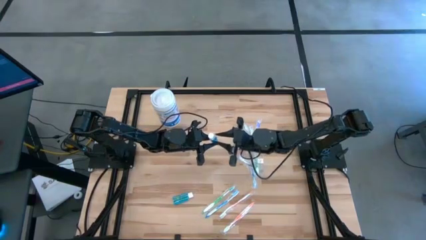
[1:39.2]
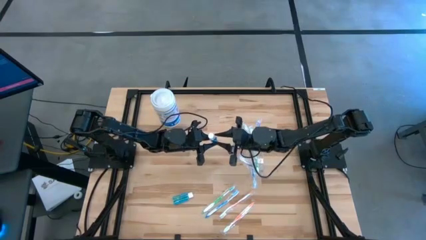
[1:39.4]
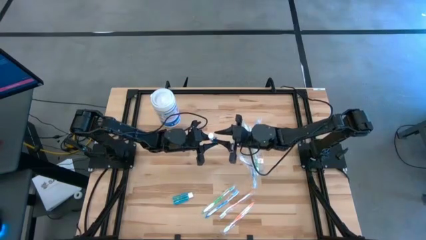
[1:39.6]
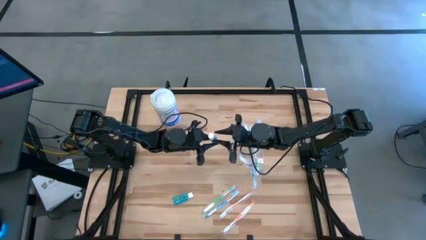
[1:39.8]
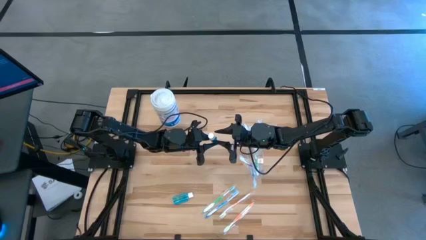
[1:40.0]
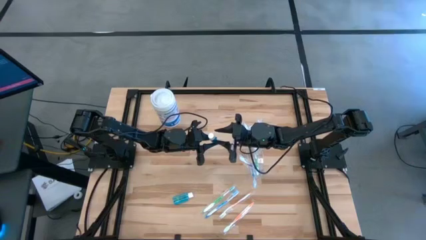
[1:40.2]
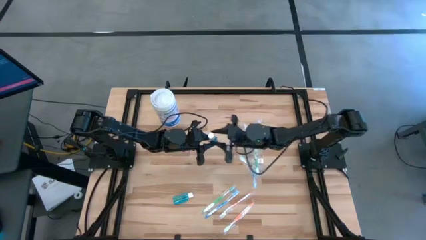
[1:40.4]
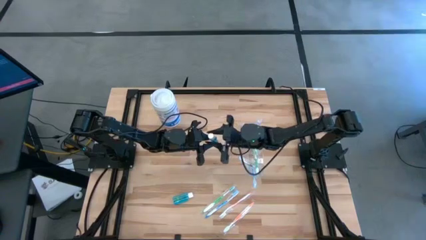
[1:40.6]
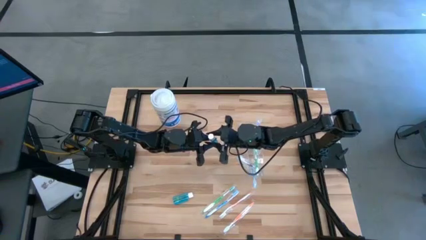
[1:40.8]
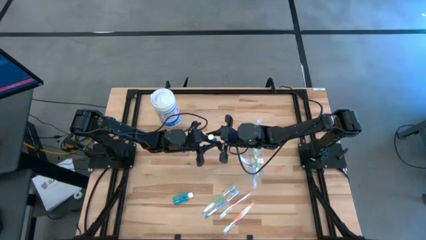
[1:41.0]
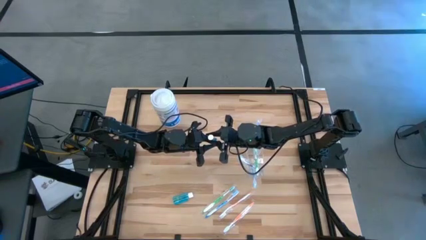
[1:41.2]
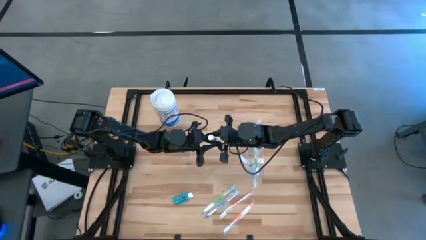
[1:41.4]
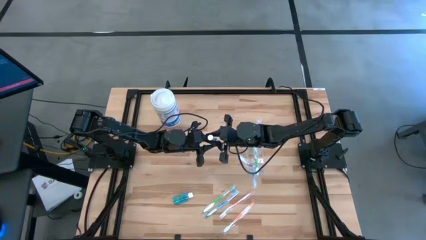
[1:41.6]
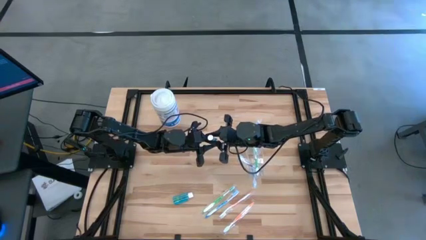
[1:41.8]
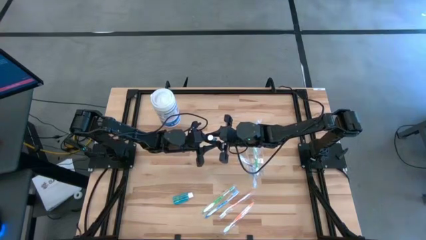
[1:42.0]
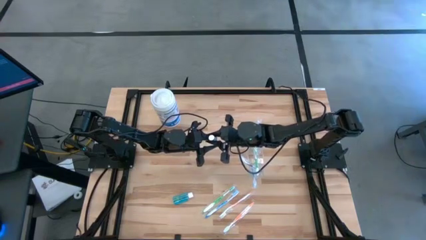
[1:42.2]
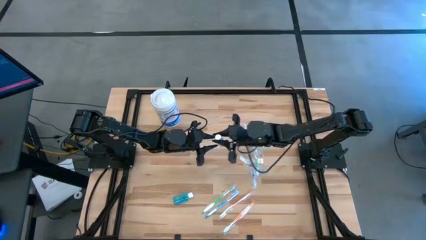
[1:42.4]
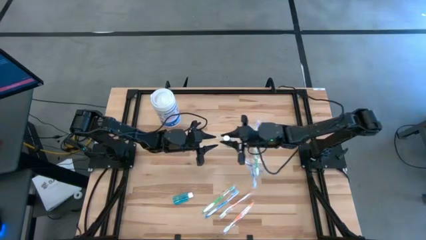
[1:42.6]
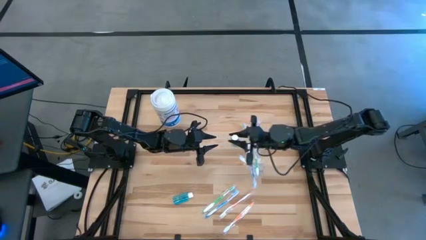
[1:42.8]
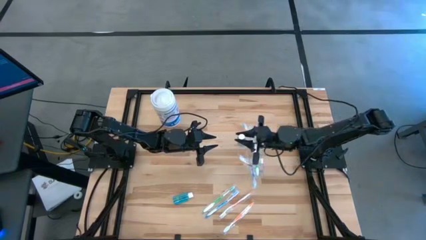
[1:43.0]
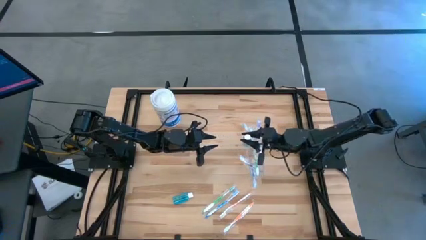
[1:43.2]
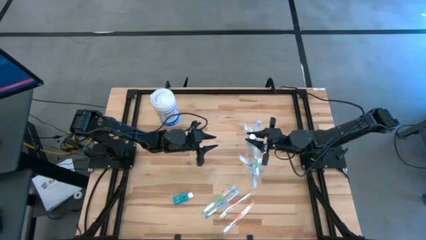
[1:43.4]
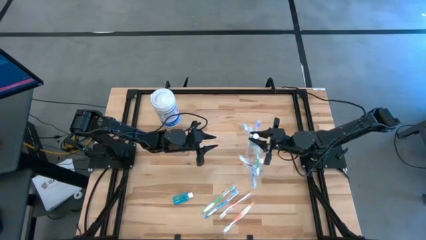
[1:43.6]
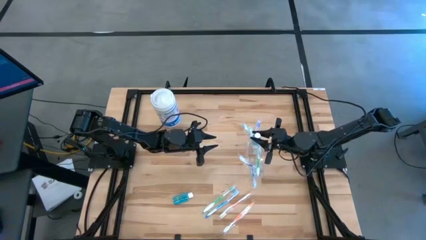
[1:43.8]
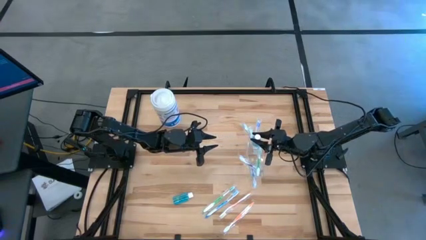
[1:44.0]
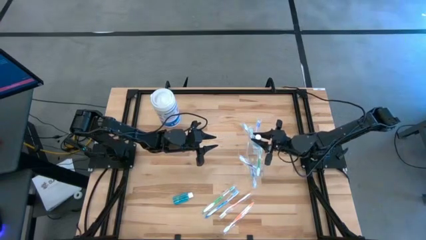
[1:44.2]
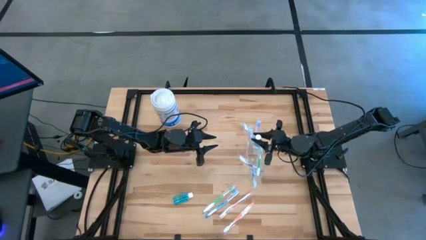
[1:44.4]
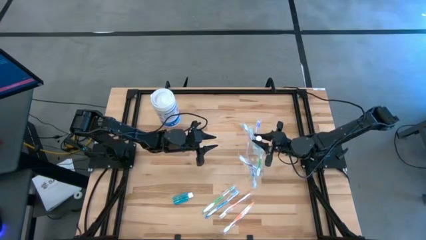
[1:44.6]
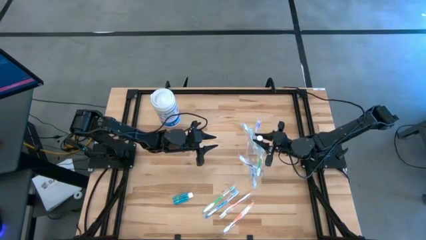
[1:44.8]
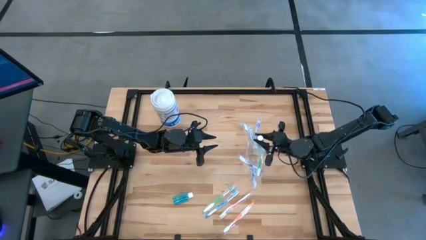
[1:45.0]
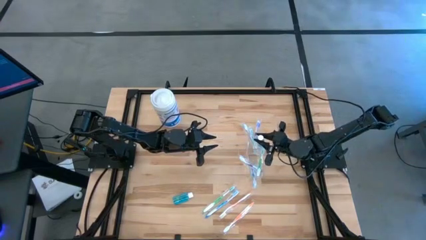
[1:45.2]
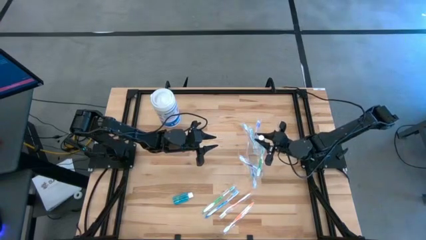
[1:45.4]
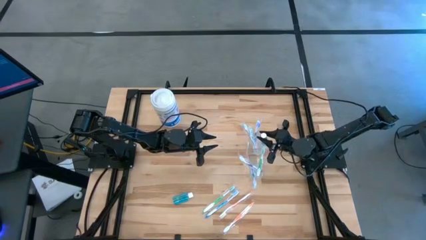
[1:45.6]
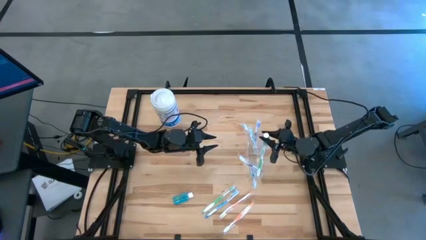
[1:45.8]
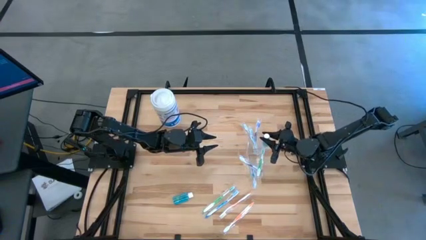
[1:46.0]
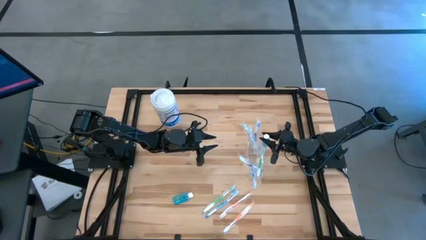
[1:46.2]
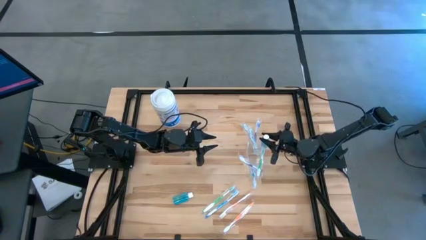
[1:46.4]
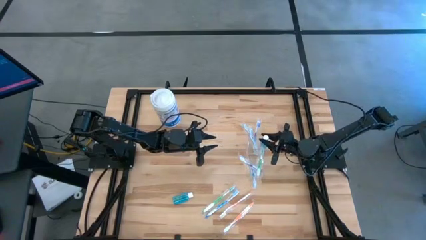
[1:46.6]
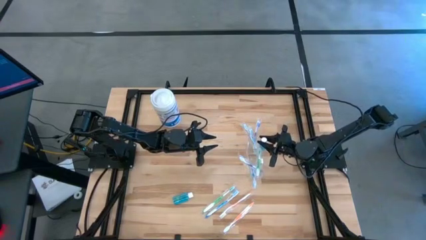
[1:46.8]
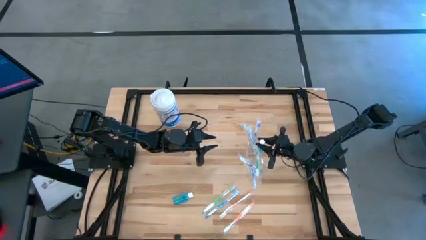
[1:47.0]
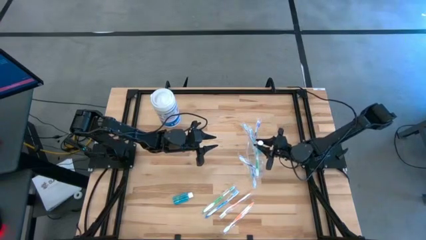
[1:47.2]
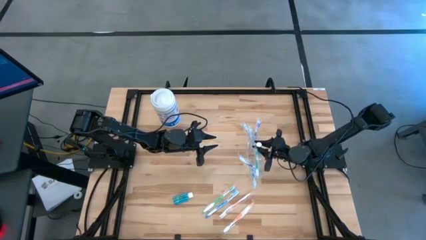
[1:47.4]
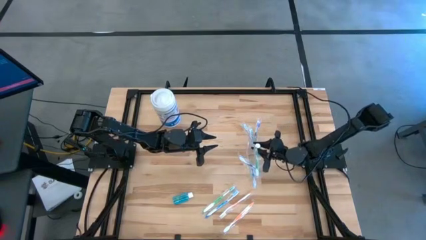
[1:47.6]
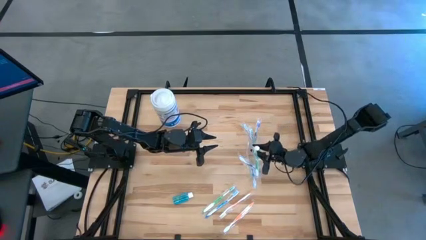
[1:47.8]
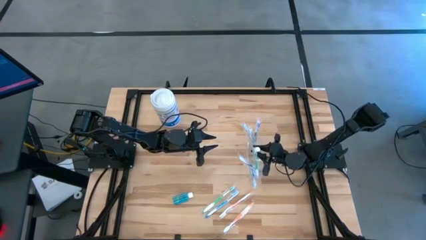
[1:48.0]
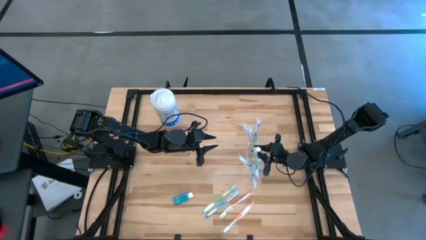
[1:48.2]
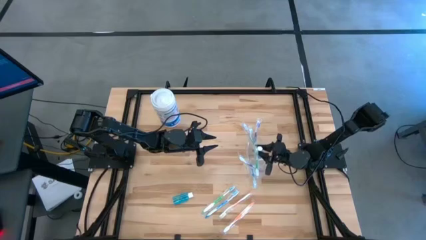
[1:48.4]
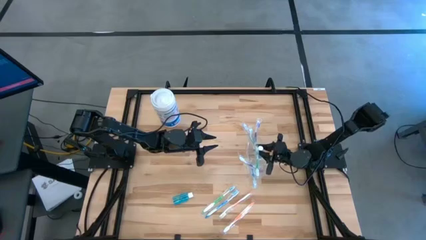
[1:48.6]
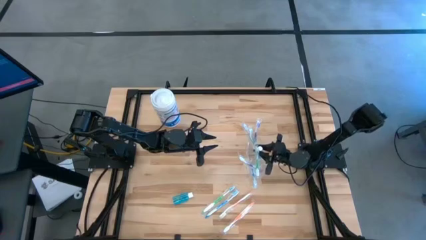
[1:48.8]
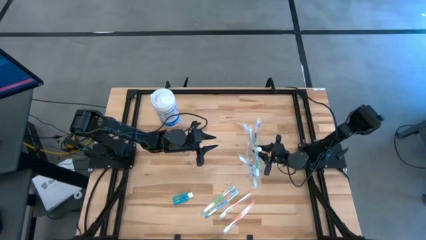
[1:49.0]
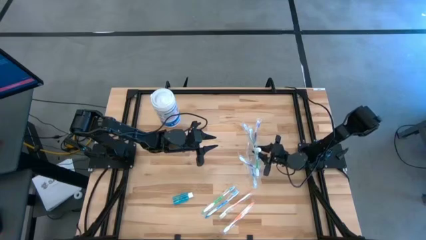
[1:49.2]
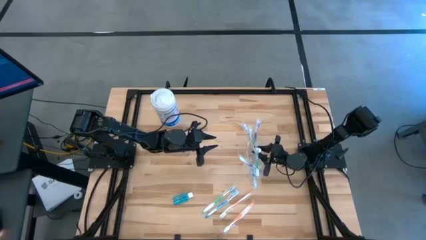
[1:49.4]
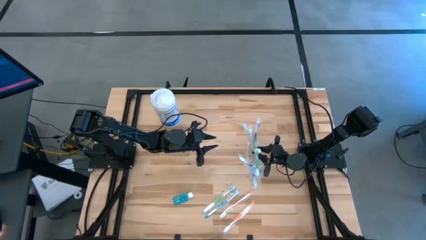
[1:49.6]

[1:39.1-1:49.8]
Task: Pick & Place toothbrushing station
Put the blue mouthwash into the transparent organizer

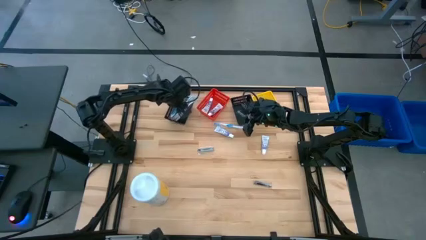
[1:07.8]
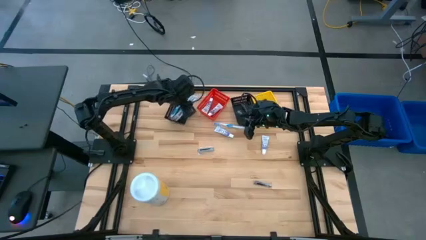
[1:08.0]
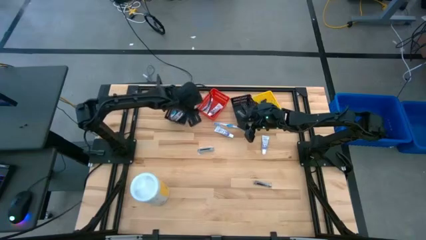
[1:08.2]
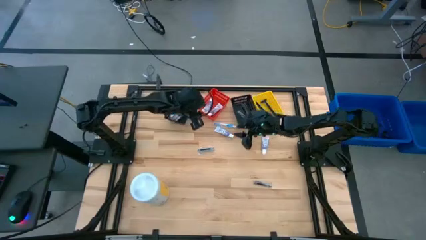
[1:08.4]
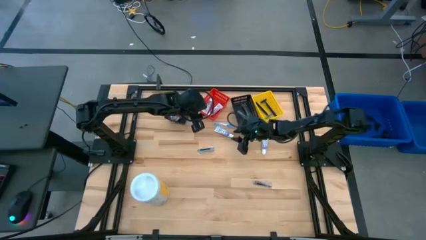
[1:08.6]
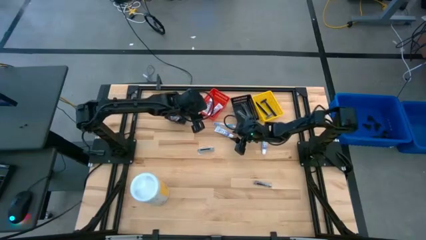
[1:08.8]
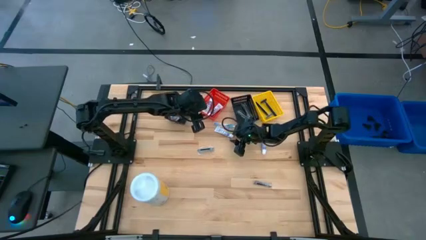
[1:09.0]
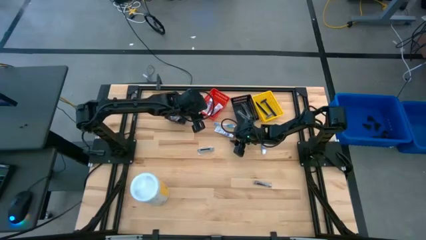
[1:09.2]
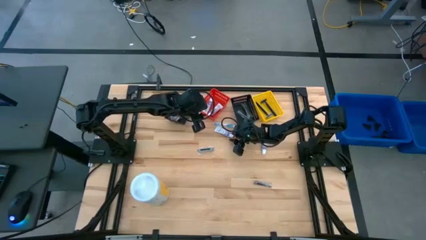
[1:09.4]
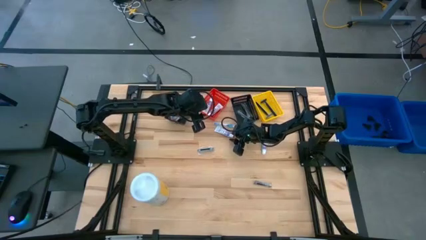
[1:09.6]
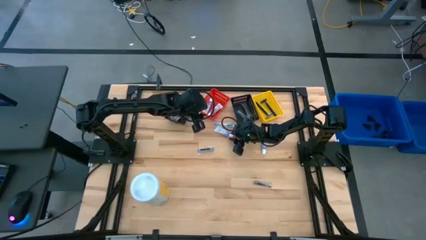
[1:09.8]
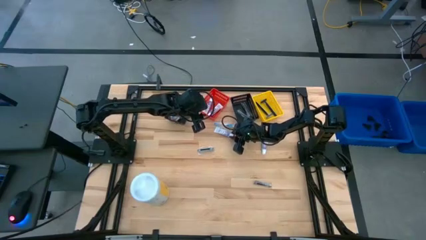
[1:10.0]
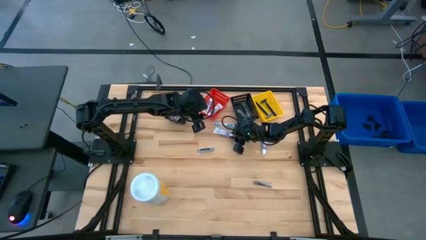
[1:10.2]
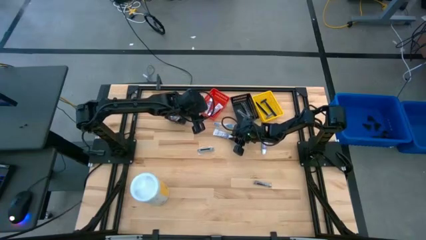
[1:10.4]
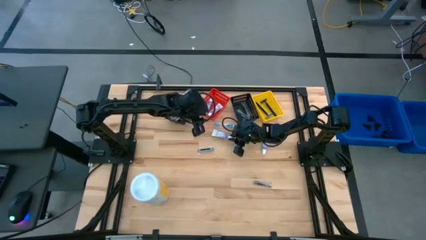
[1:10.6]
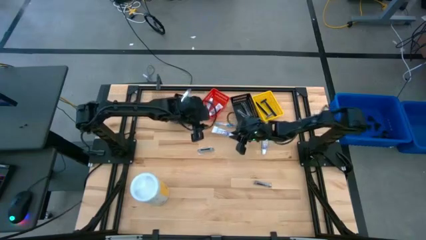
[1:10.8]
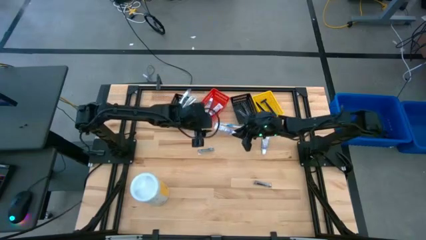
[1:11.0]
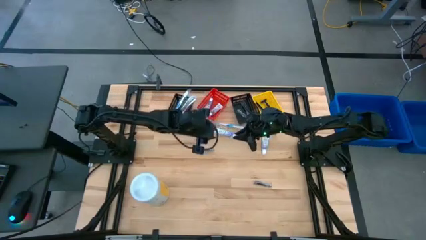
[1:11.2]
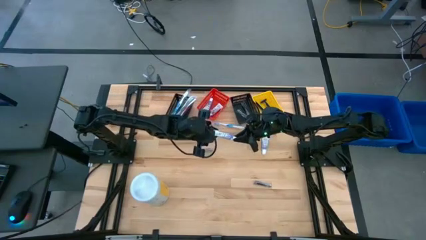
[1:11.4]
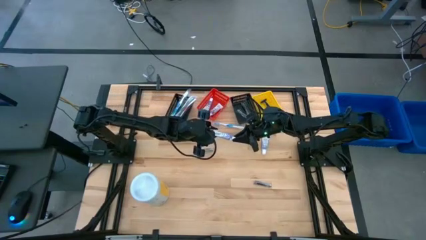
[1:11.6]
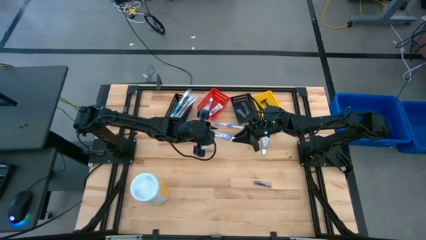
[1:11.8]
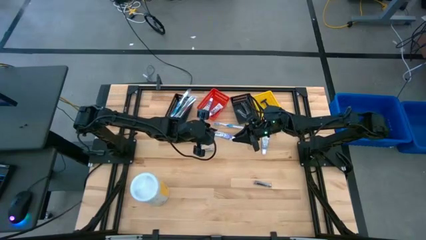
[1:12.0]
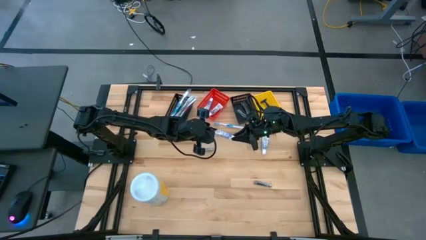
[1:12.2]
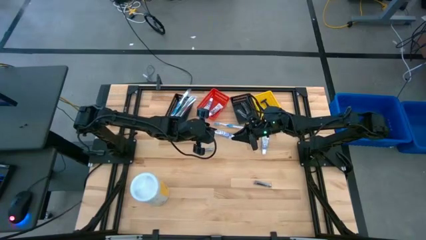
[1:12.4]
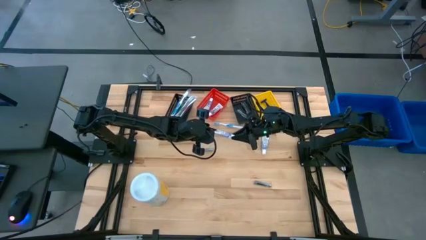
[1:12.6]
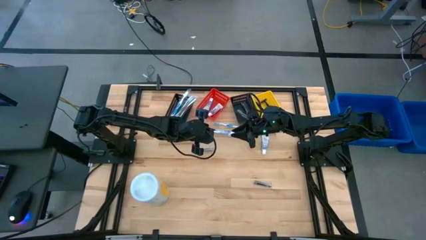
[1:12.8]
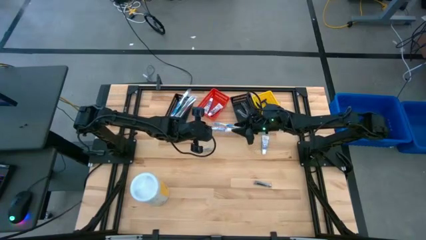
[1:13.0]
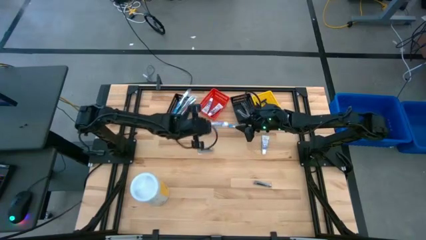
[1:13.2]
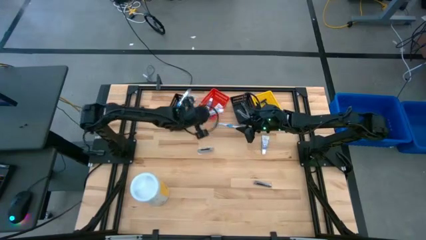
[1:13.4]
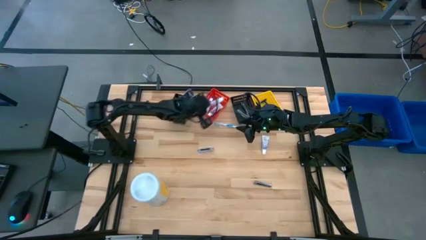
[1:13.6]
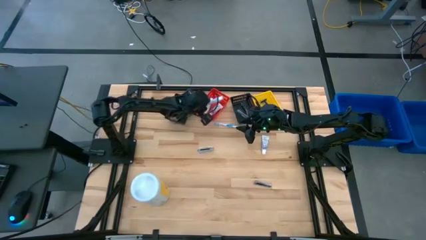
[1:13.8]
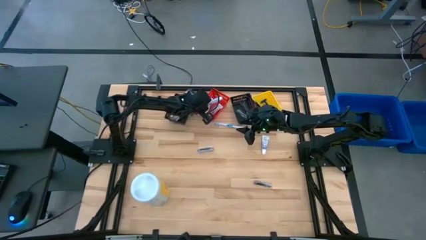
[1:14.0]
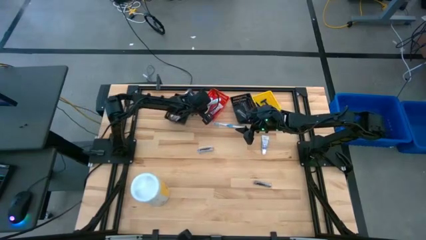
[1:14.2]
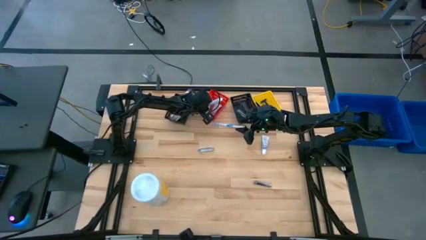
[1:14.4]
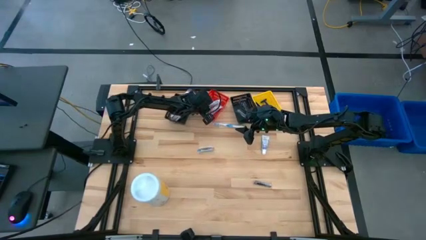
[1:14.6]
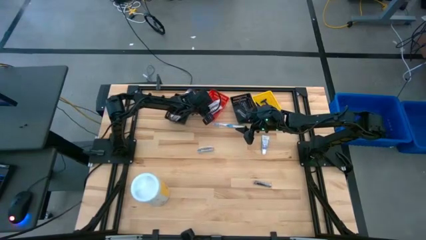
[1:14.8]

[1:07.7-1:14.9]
Task: Pick & Place Travel size toiletries
Put the toothpaste into the red bin
